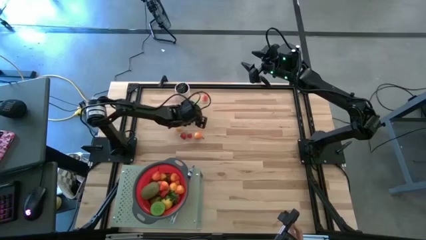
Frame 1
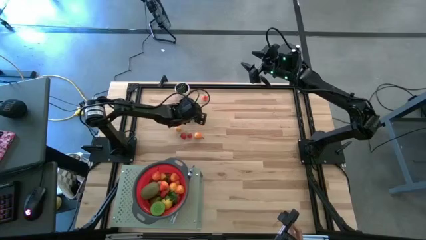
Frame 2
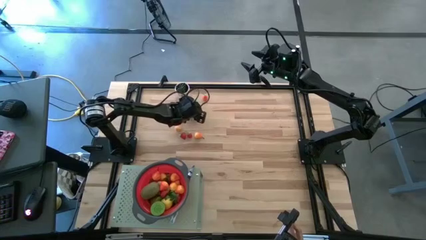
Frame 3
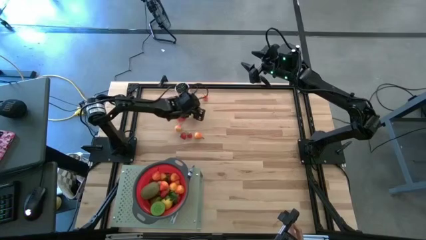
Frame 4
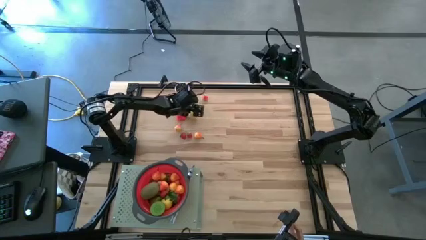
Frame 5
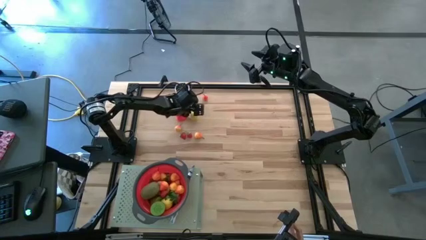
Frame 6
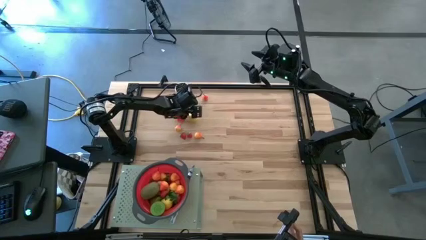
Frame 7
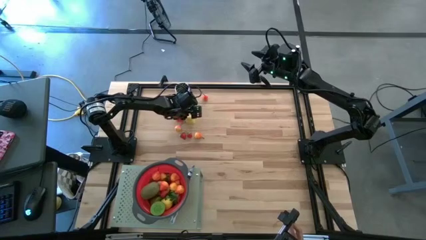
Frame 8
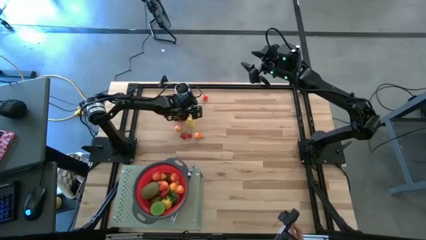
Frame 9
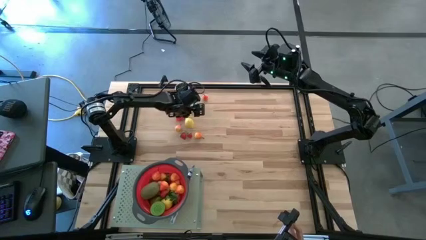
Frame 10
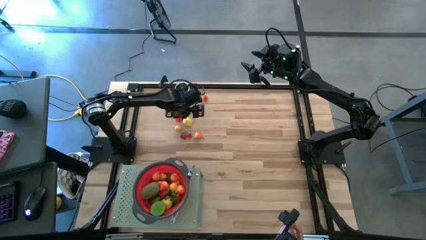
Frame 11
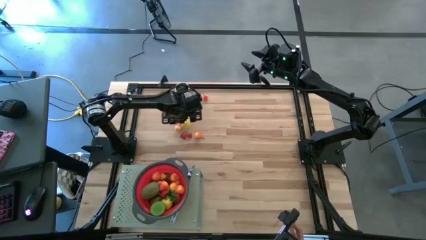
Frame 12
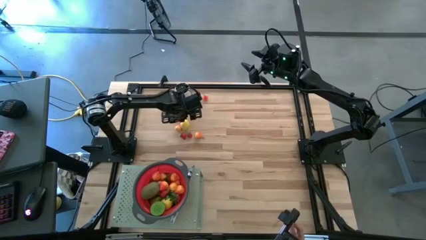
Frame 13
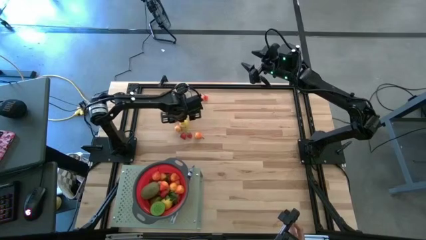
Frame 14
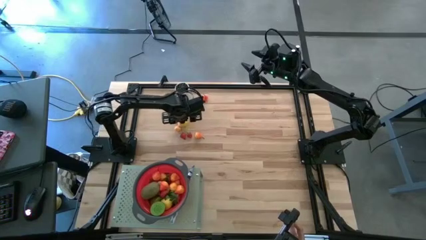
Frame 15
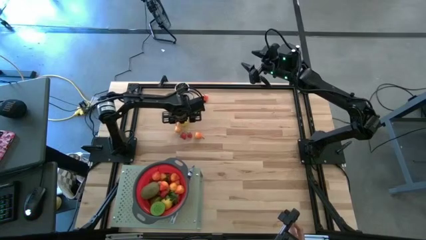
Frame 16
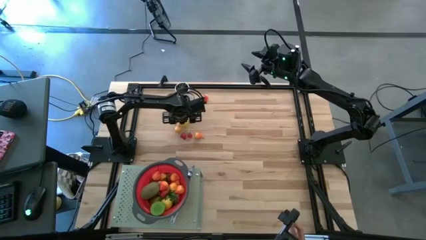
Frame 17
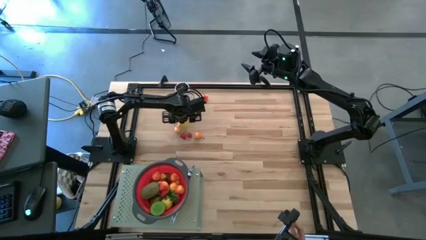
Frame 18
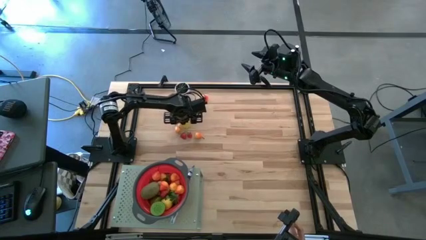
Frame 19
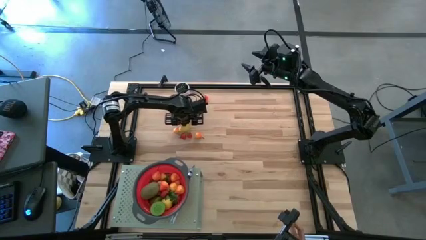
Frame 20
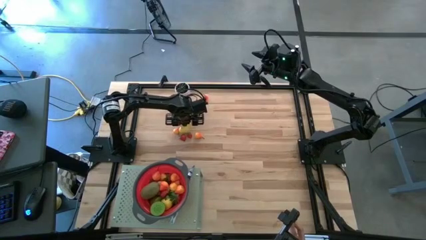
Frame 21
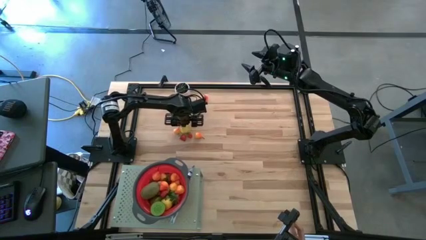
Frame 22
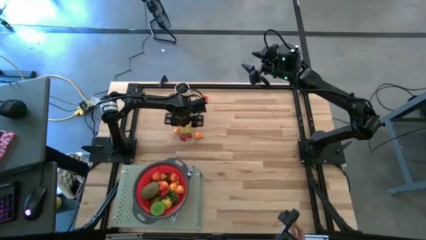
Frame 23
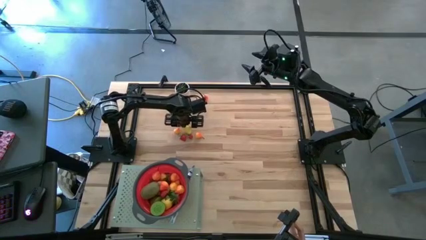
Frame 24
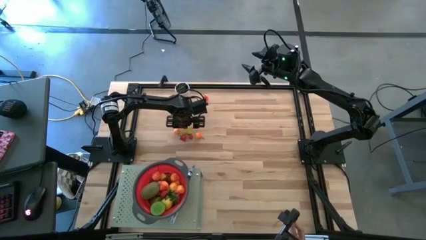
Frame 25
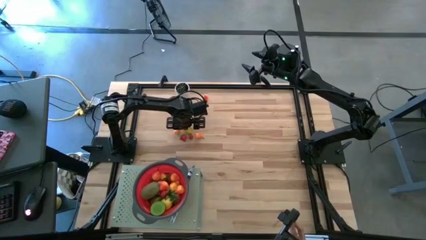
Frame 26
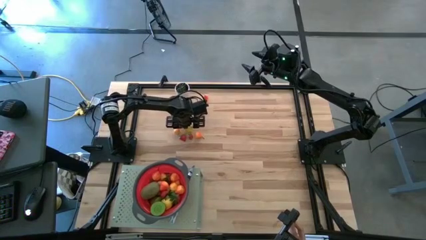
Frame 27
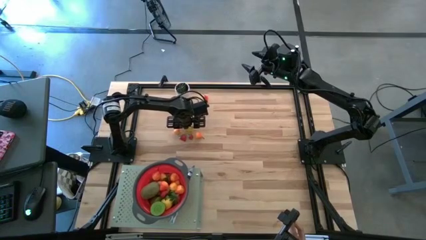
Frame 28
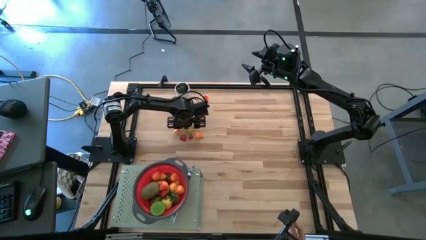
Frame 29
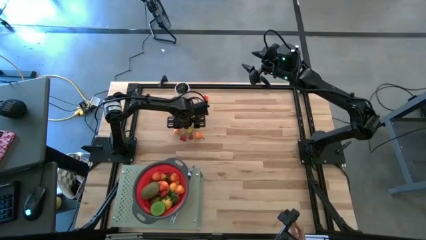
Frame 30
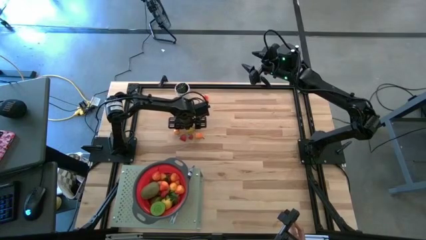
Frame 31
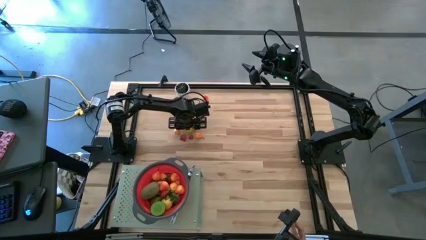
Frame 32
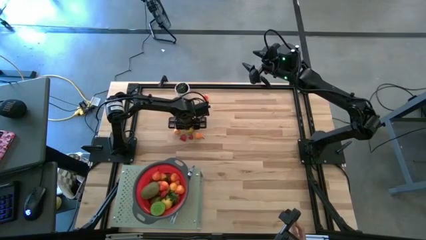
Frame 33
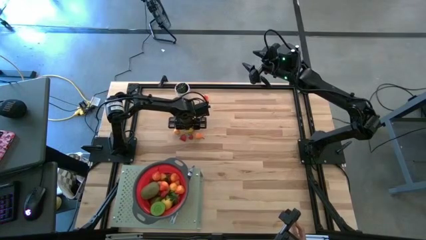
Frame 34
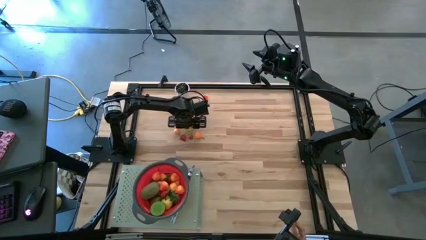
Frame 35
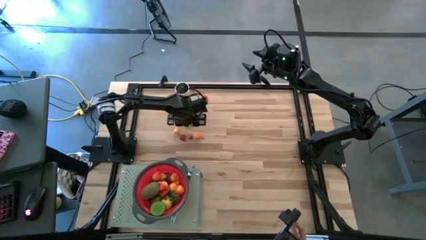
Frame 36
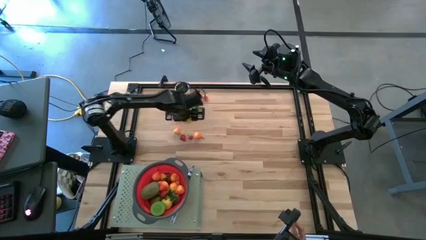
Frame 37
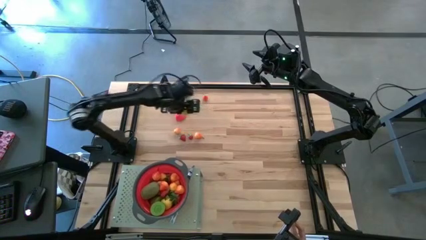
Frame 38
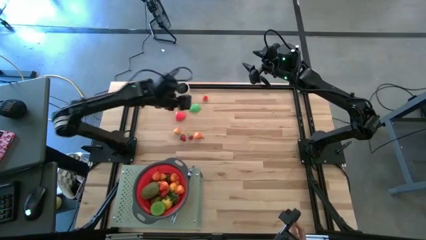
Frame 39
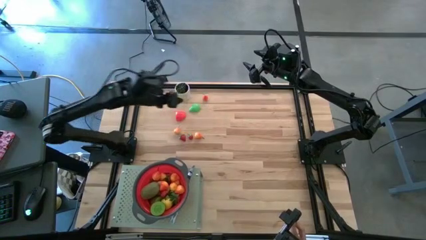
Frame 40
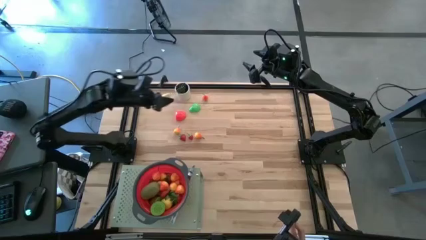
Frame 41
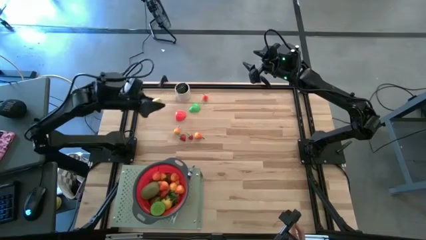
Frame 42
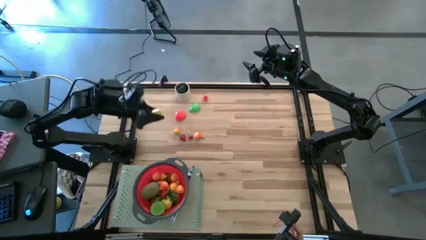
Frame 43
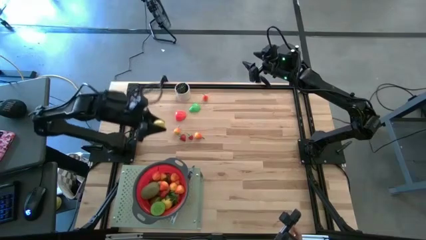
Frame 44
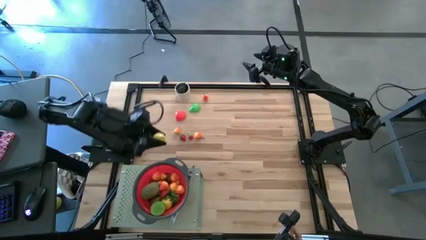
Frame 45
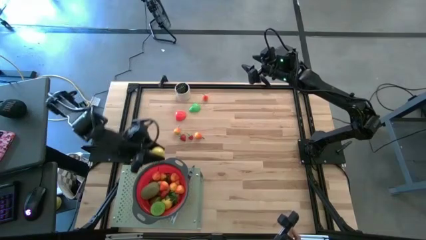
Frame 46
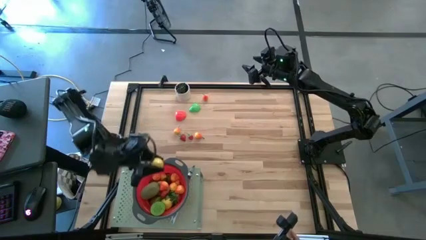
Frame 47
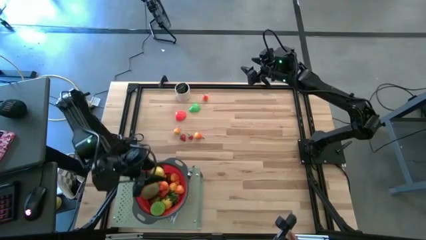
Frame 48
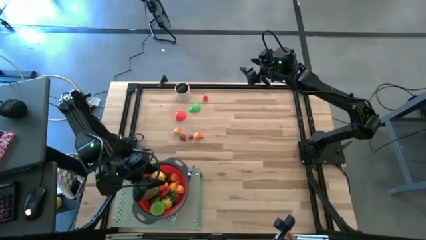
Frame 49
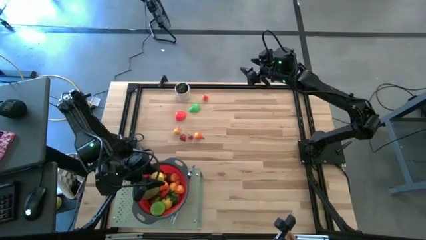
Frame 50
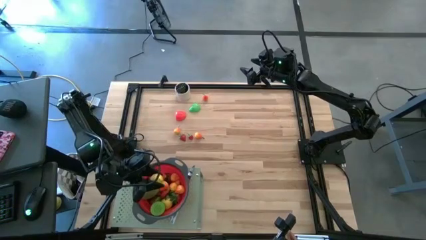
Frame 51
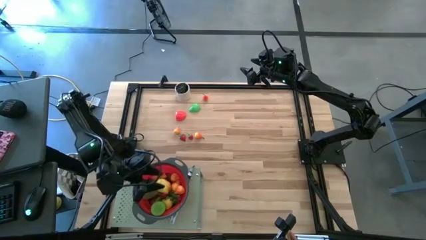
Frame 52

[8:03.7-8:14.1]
Task: Pick & Place Fruit
Put the lemon into the red strainer bowl on the shelf

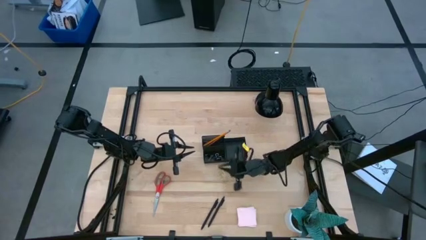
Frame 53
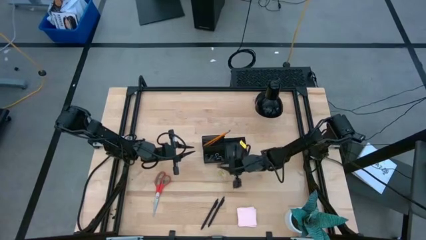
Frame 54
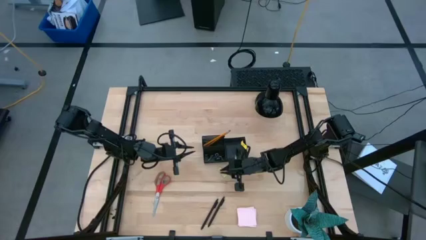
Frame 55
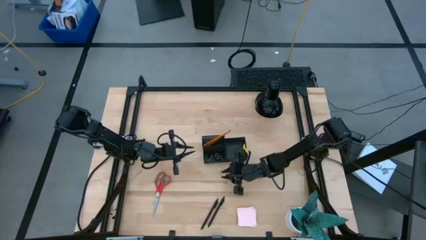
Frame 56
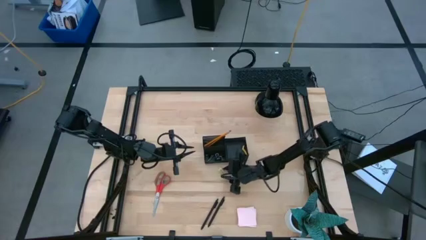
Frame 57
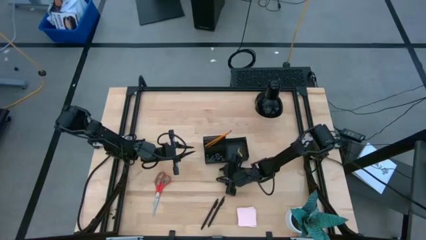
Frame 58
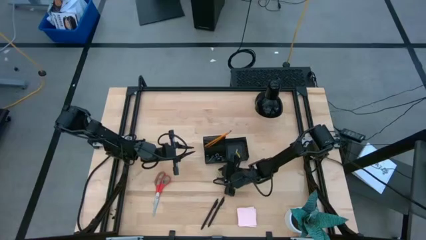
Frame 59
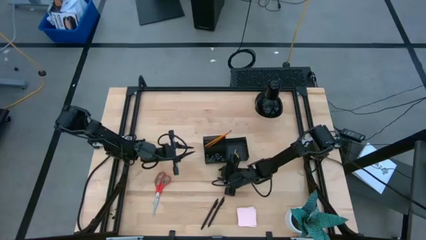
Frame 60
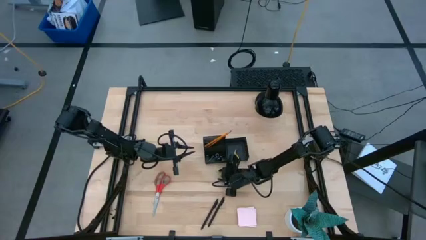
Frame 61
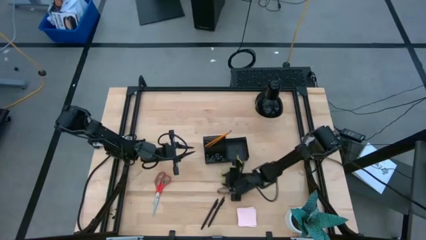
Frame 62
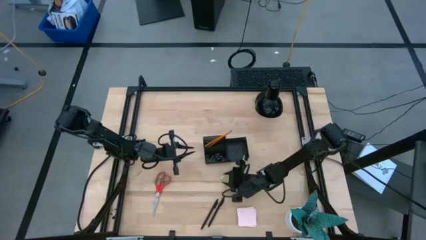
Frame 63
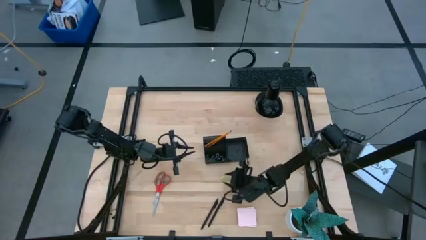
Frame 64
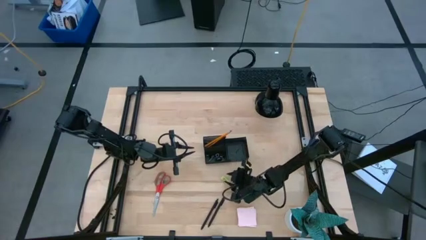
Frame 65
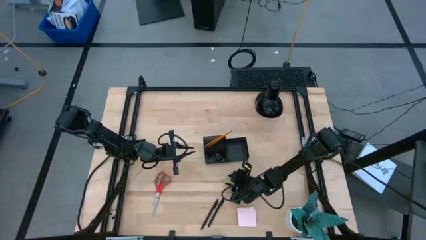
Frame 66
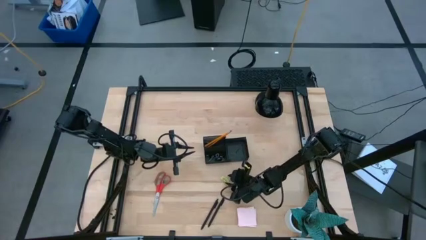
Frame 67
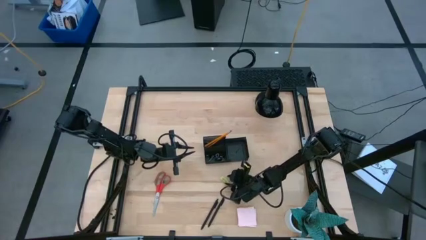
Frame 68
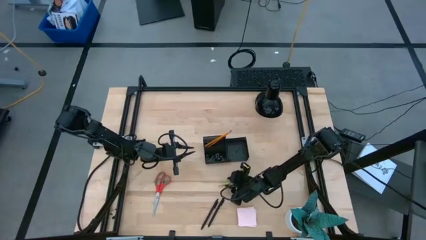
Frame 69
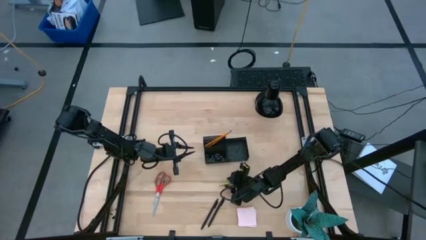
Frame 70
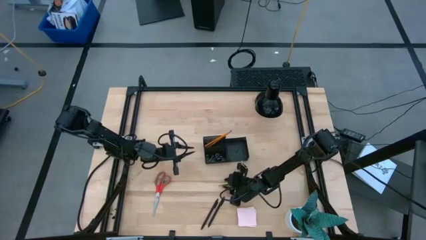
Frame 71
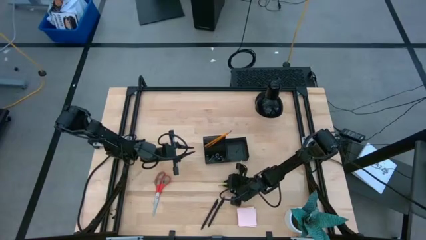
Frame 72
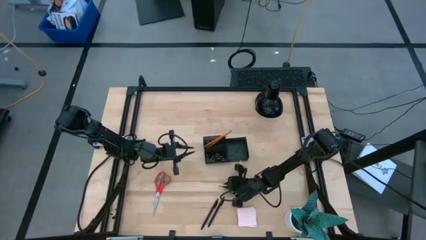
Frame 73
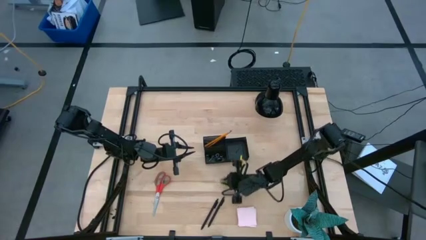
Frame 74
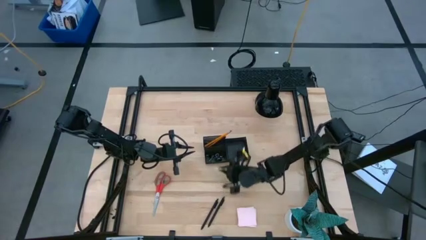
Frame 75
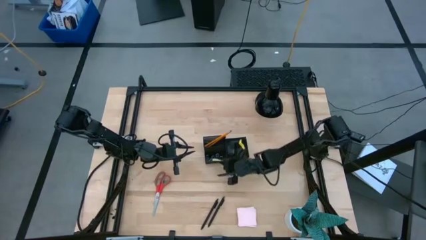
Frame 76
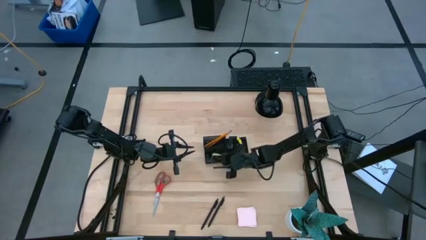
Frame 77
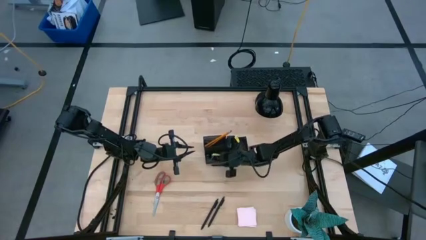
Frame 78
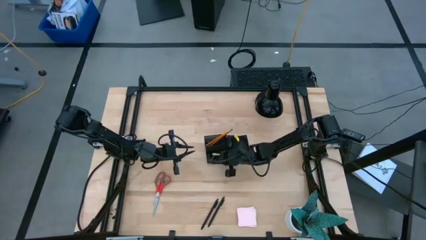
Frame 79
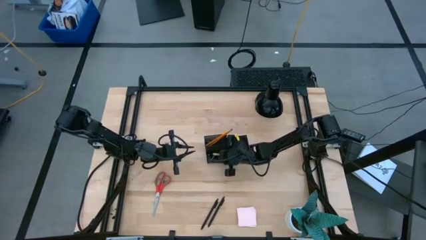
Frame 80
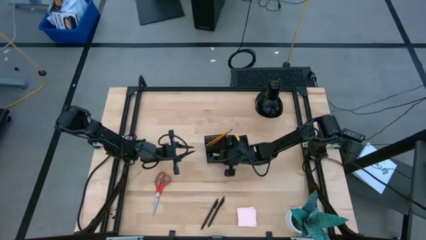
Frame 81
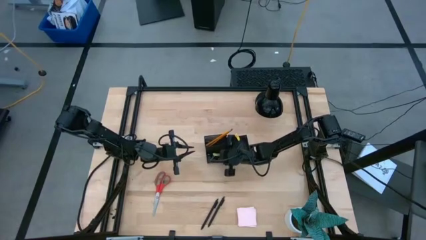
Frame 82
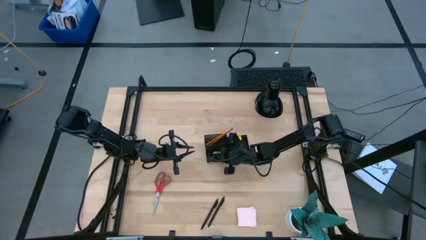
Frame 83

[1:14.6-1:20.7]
Task: Pick and place office supplies into organizer
Put the light green eraser into the black desk organizer

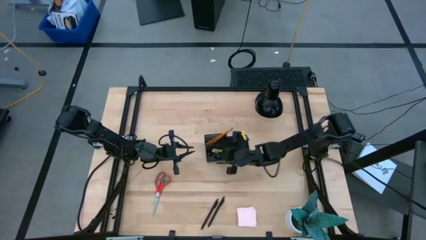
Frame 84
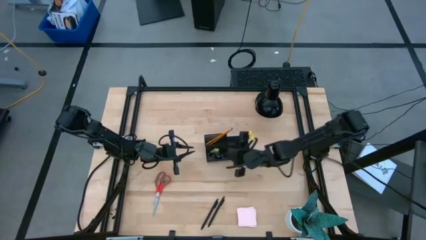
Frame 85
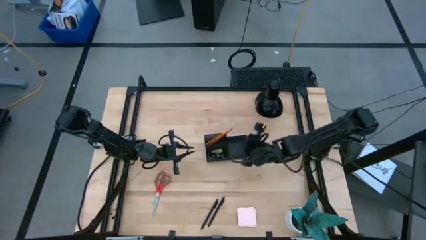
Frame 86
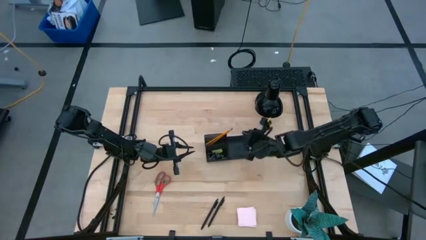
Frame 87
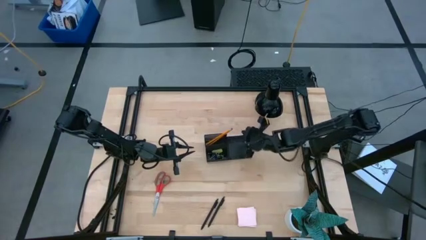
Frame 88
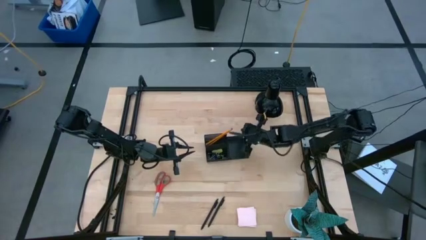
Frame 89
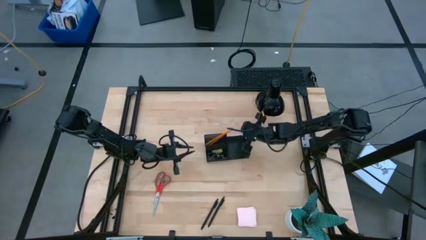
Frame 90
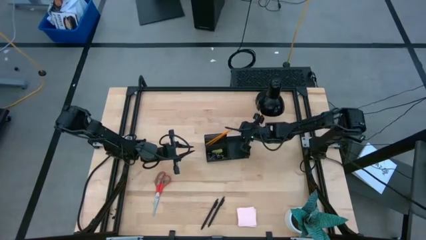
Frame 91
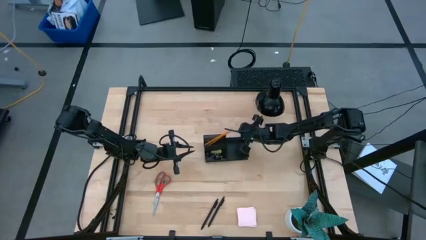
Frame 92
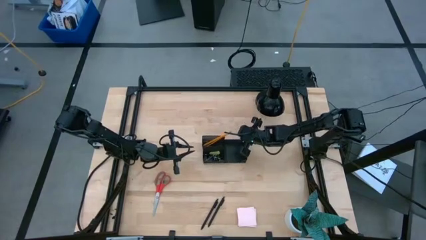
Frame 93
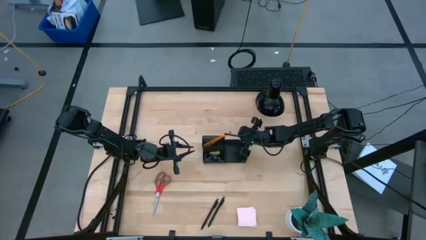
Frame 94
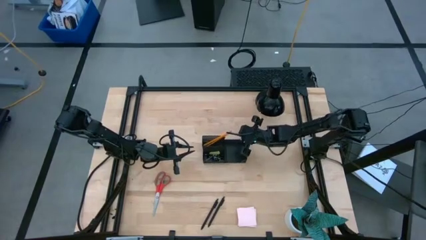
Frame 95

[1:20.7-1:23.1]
Adjust the black desk organizer
